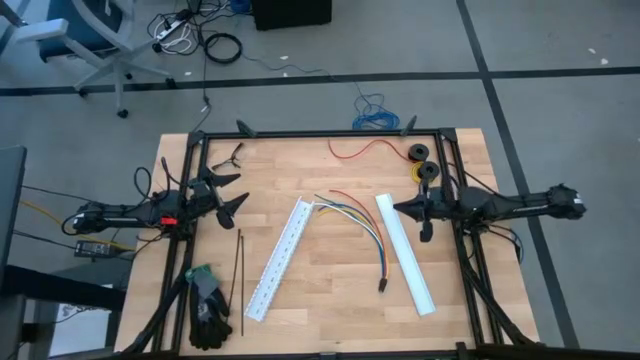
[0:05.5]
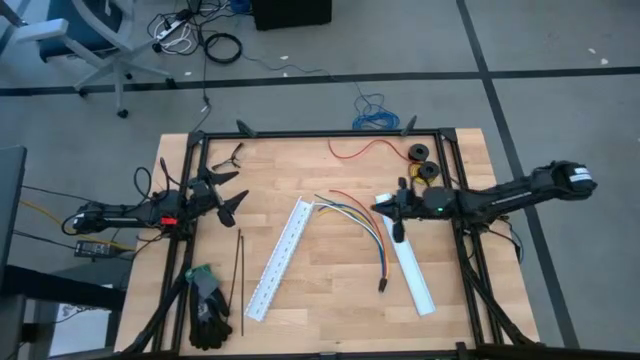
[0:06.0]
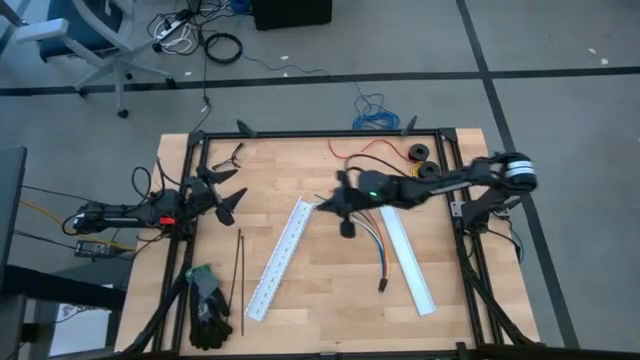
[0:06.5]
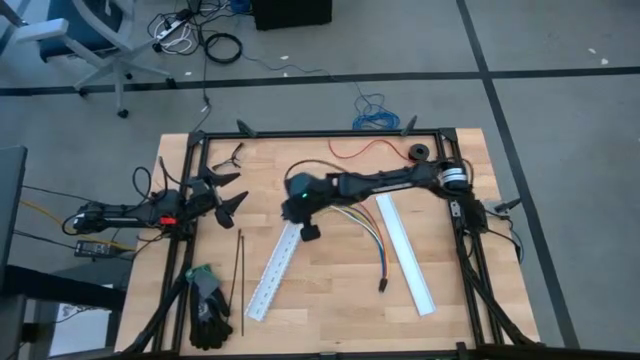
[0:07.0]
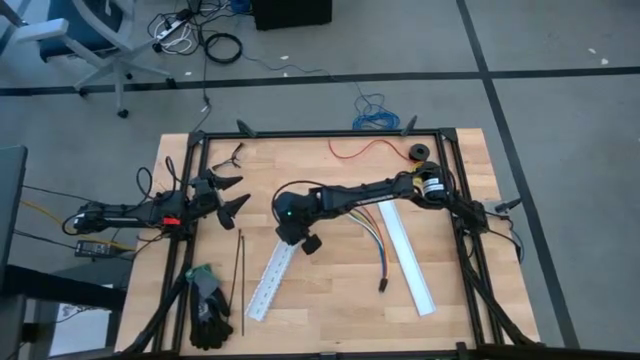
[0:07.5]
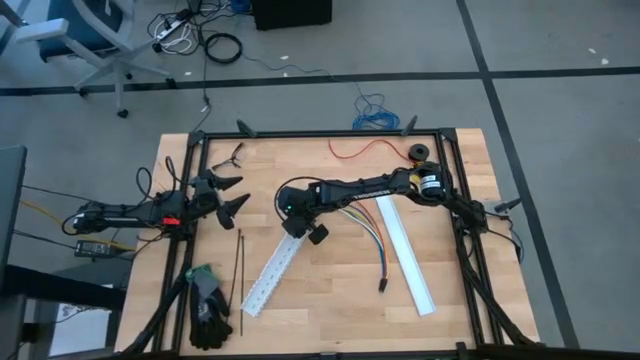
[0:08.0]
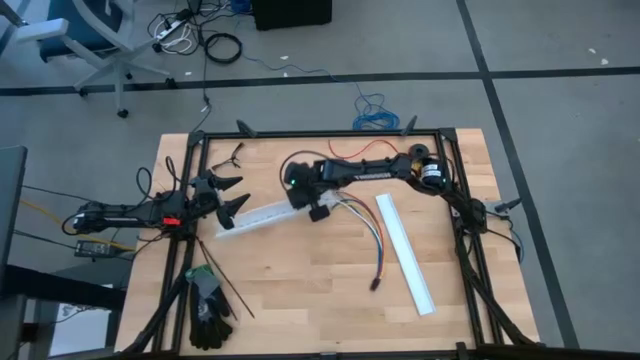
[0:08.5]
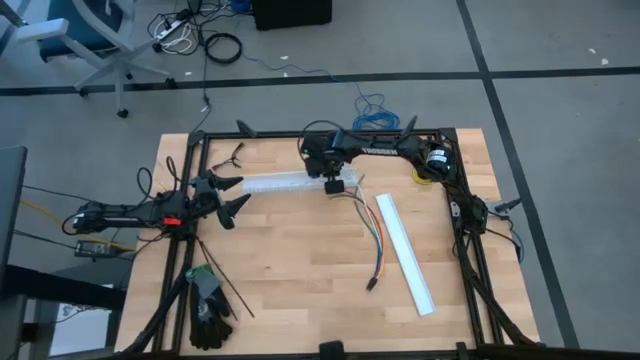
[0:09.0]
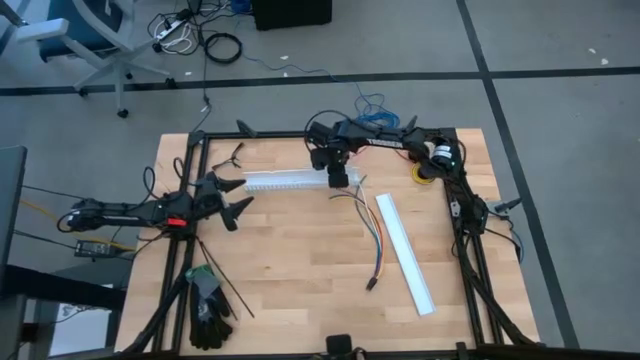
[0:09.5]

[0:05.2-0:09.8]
Task: Ziptie cables
Move the white cable duct to the top left

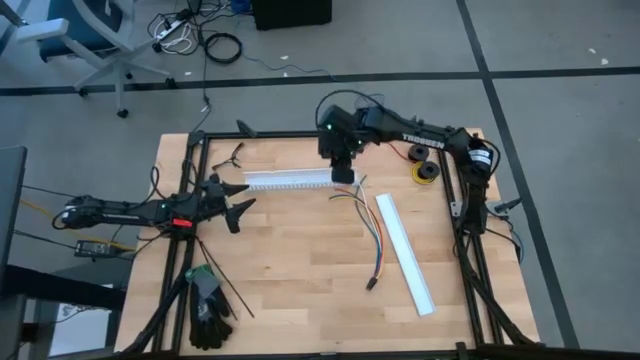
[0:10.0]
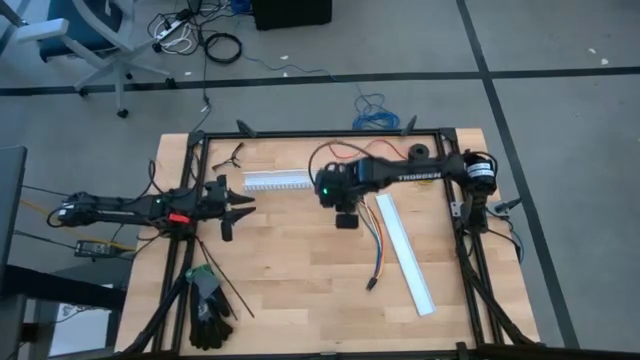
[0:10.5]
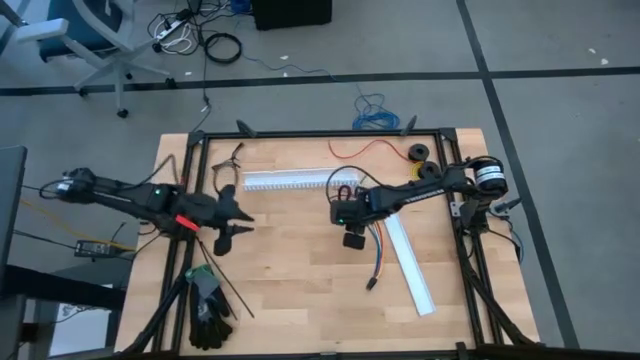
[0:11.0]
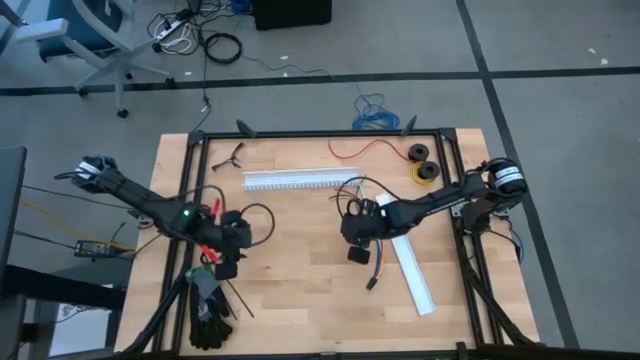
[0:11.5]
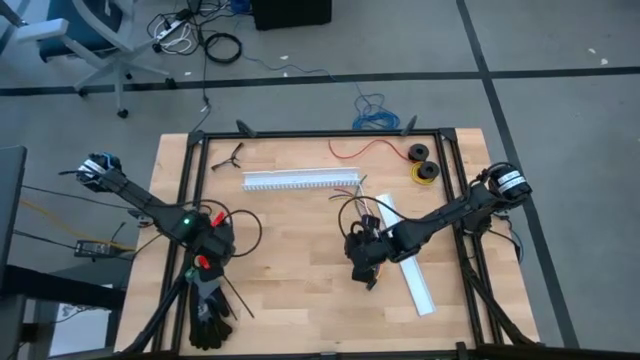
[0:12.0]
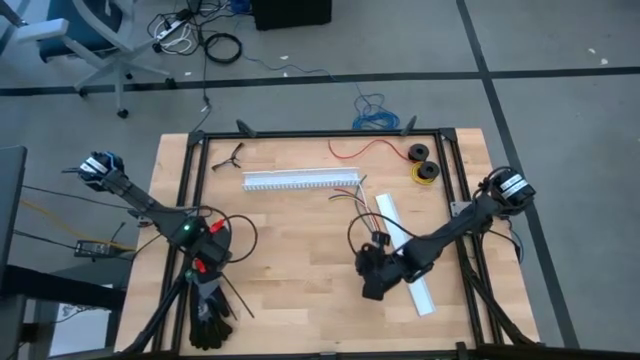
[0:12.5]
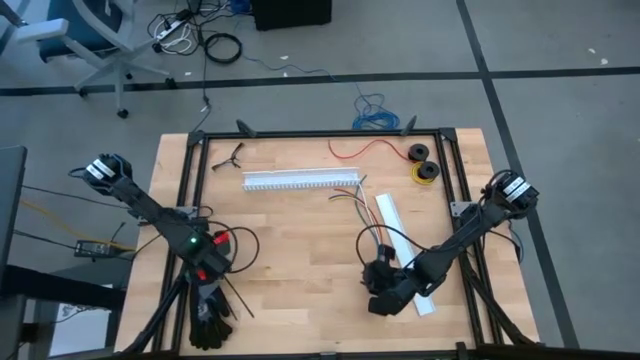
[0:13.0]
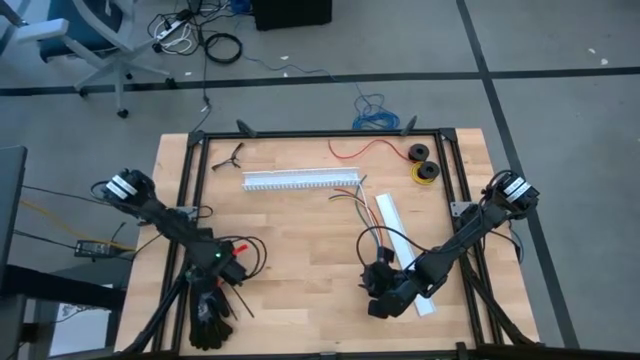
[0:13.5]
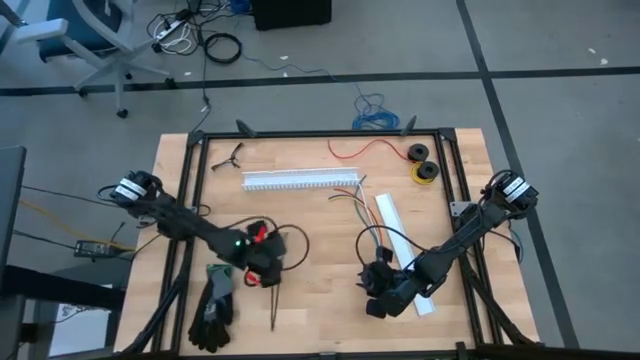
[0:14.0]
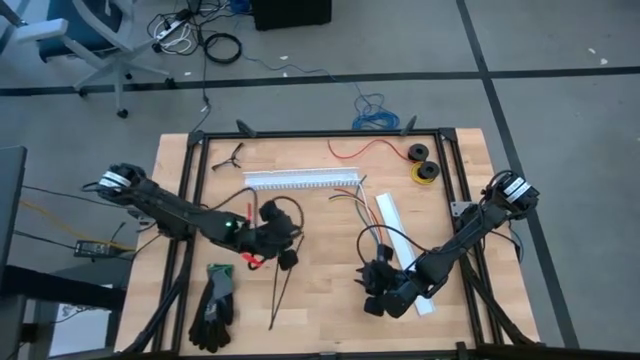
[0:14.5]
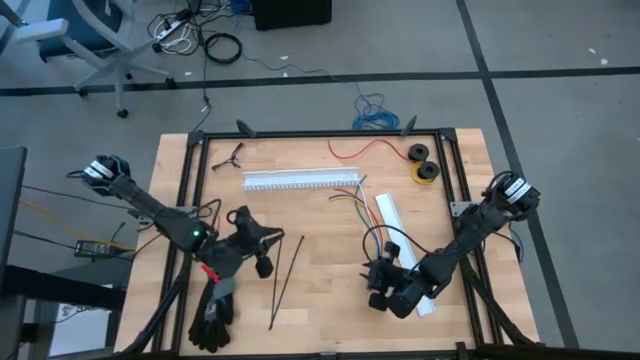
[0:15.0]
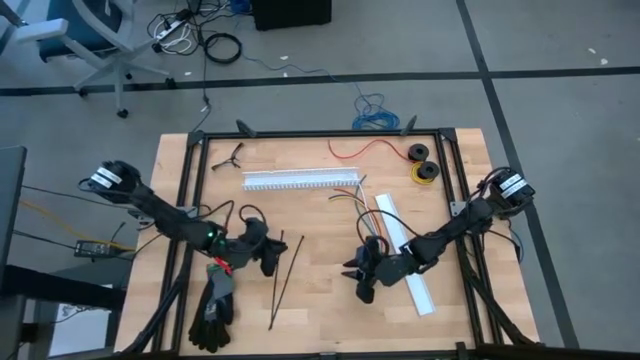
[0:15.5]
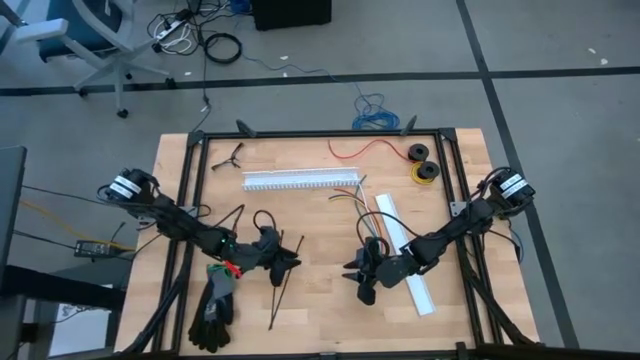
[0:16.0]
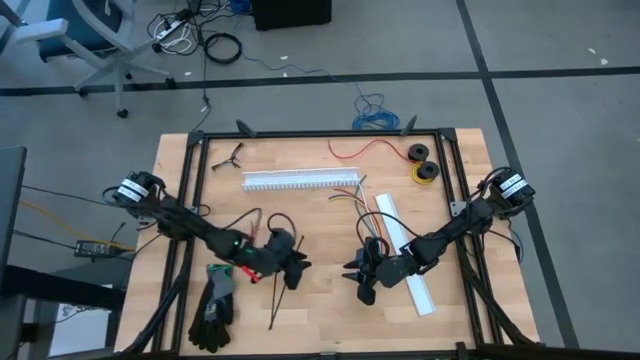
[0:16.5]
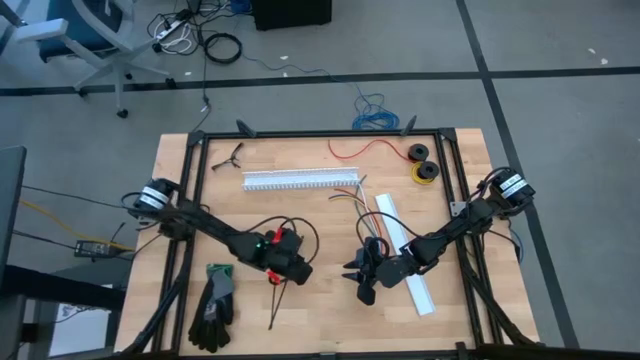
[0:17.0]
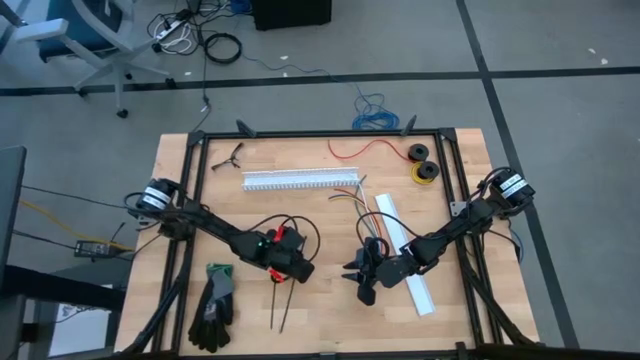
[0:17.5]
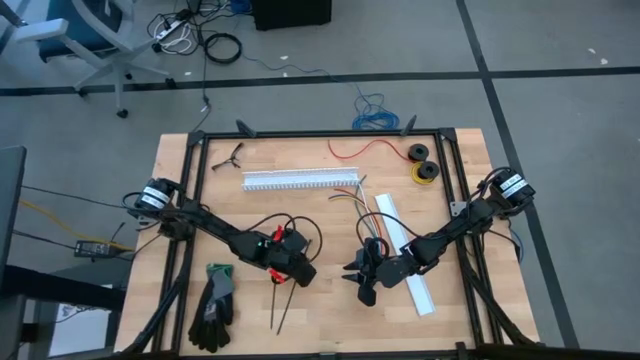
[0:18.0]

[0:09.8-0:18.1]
Prepare the black zip tie

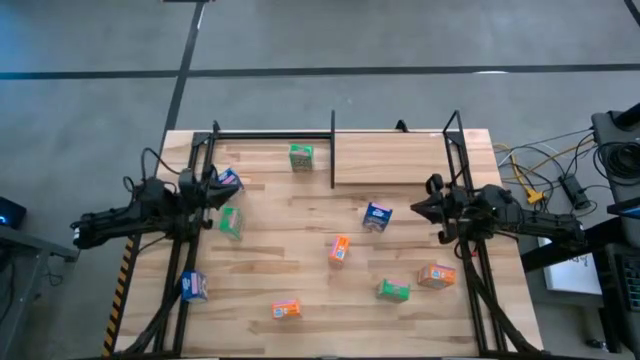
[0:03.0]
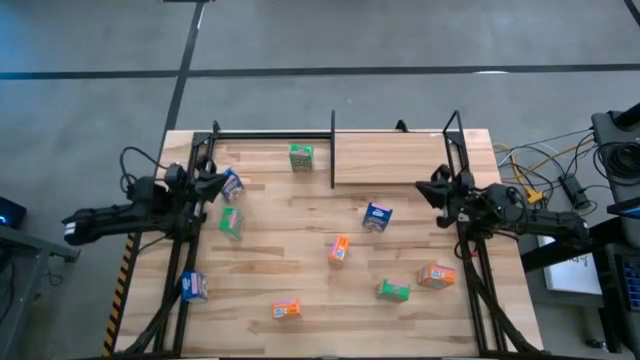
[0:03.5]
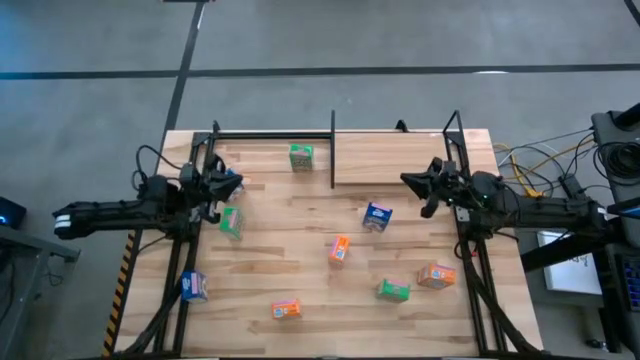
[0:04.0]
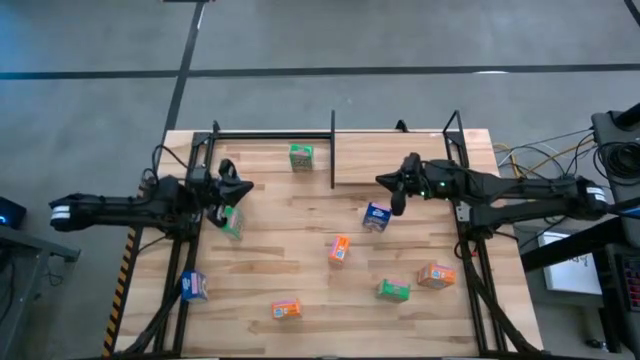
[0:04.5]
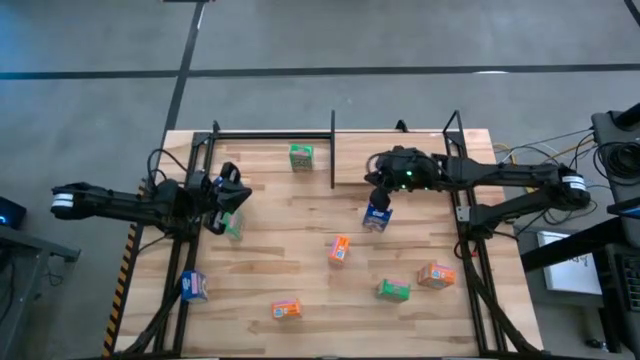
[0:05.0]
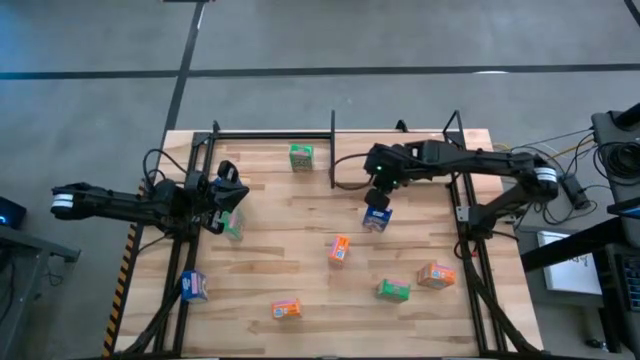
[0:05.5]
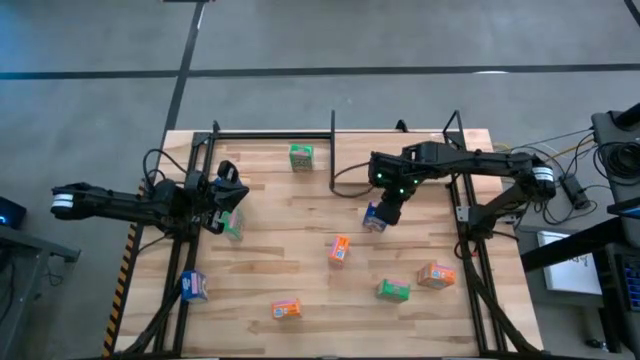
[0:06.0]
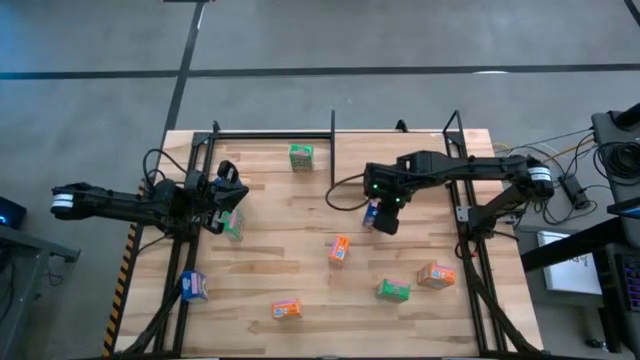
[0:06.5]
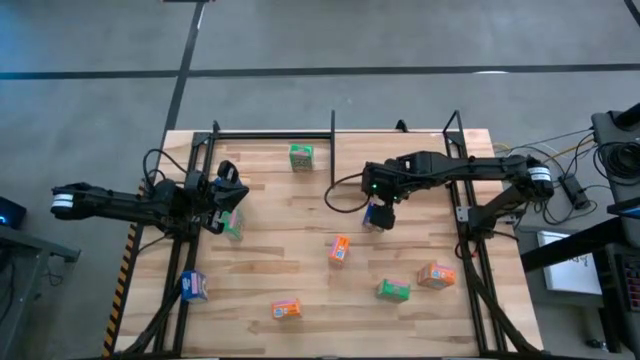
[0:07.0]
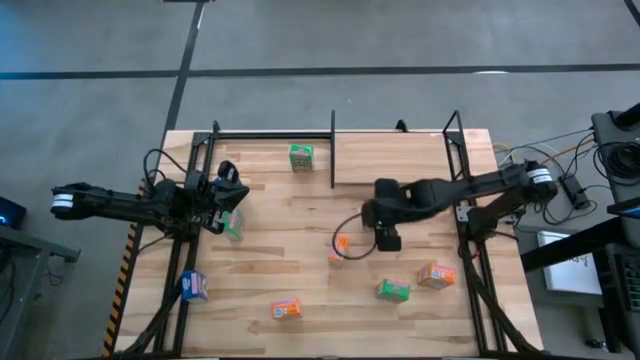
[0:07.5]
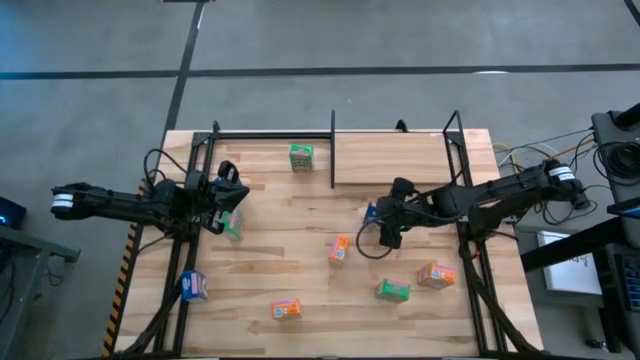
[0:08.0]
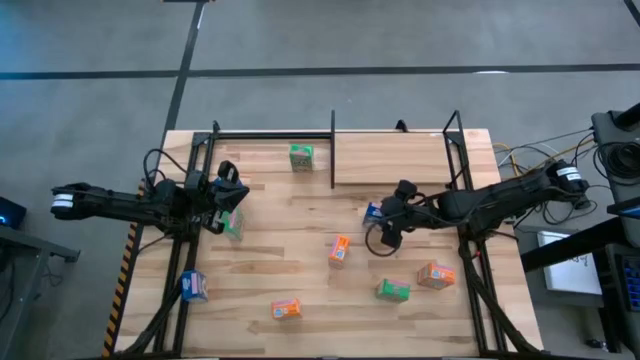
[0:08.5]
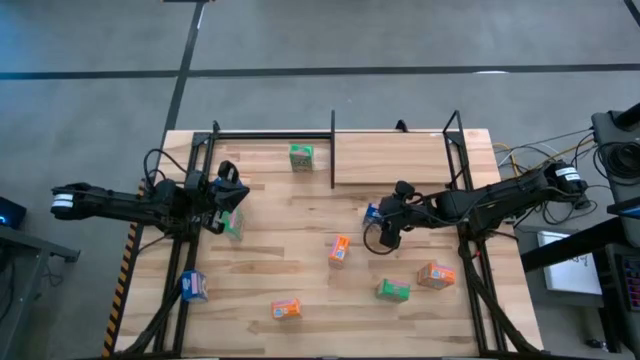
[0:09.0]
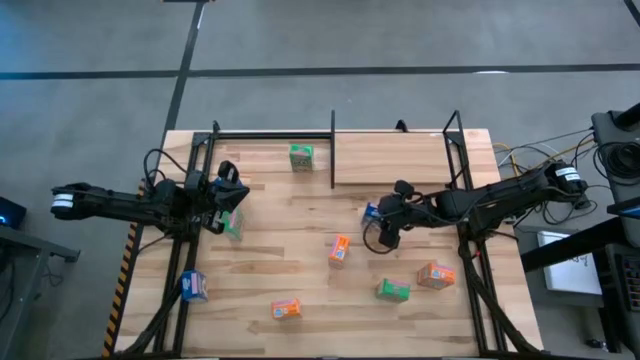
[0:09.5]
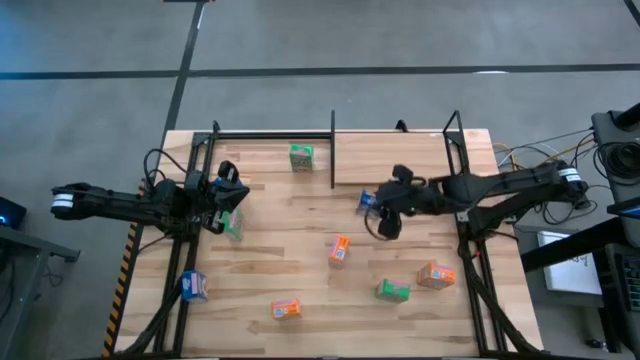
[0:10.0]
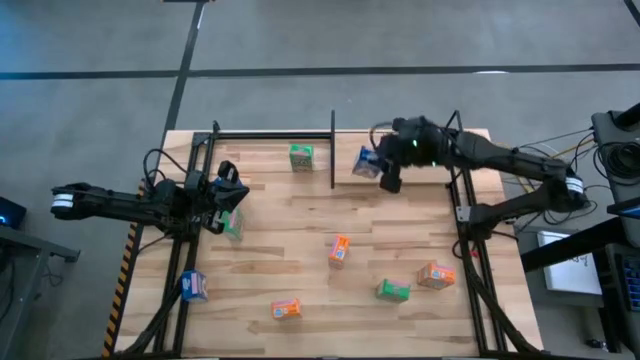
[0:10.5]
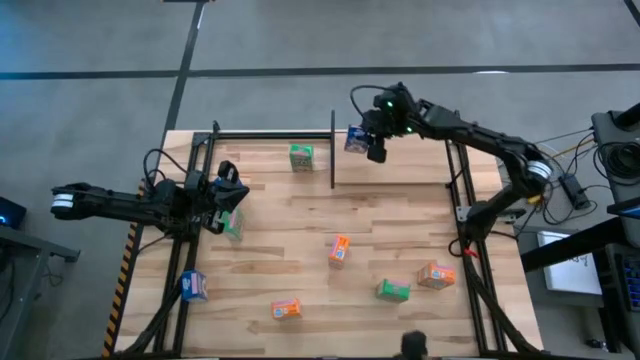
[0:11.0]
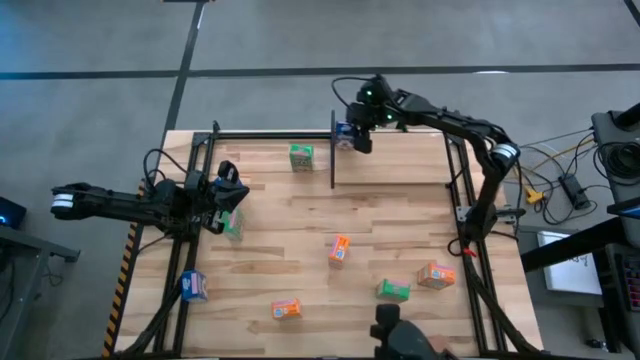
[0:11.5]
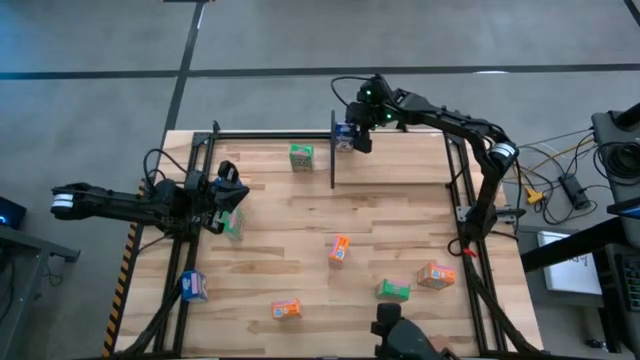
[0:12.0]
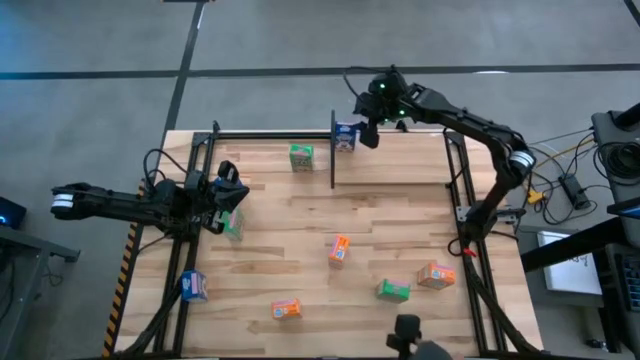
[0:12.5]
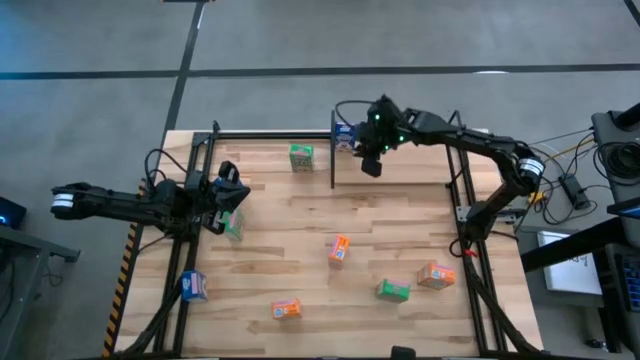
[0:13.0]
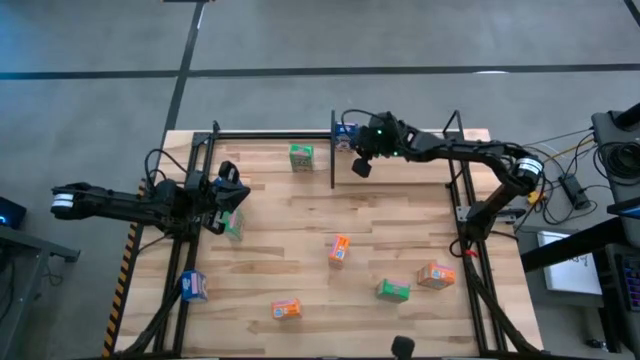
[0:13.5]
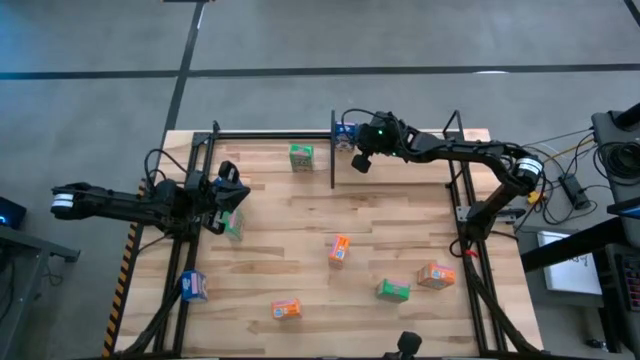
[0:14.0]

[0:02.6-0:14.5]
Task: Stack cereal on shelf
Put the middle right blue cereal box on the shelf
